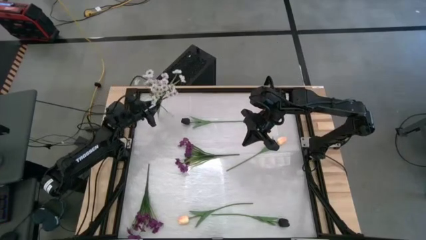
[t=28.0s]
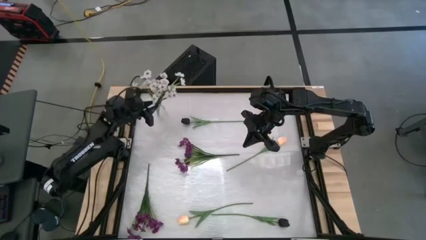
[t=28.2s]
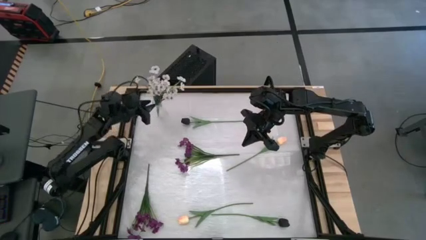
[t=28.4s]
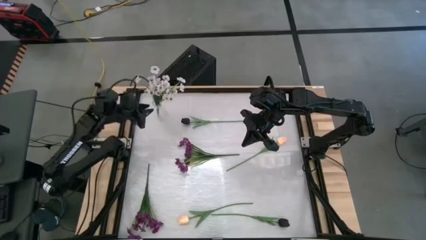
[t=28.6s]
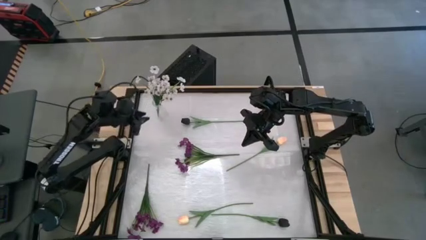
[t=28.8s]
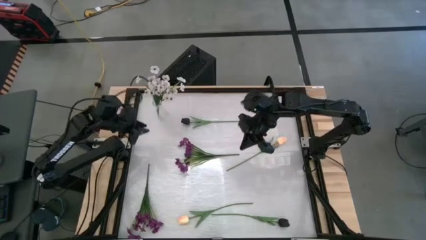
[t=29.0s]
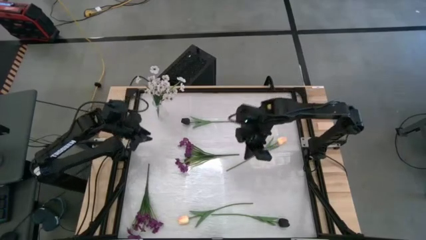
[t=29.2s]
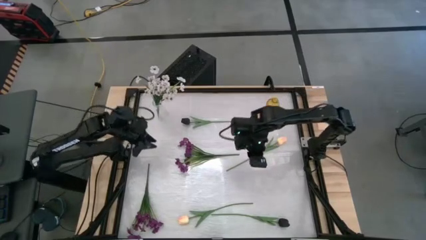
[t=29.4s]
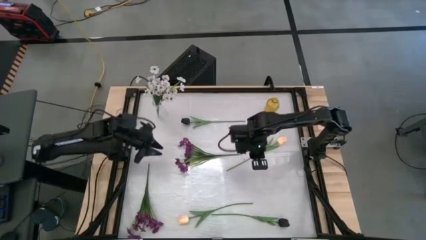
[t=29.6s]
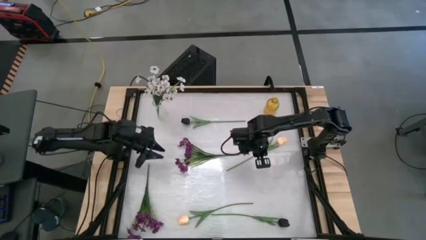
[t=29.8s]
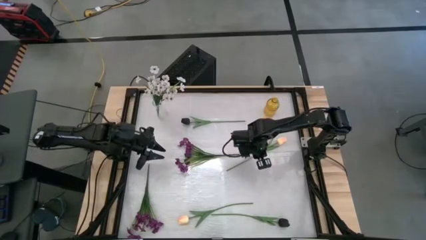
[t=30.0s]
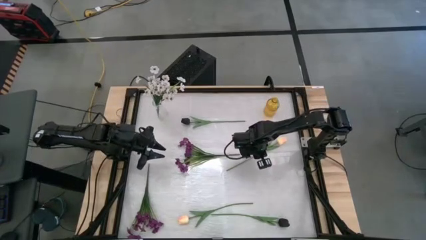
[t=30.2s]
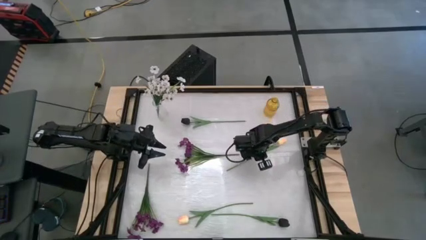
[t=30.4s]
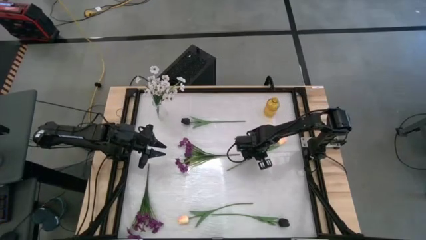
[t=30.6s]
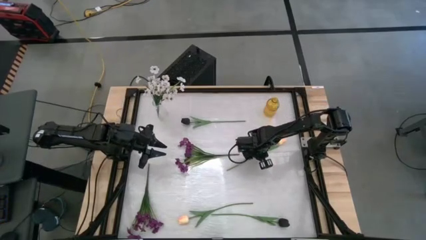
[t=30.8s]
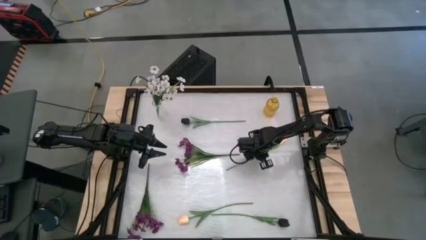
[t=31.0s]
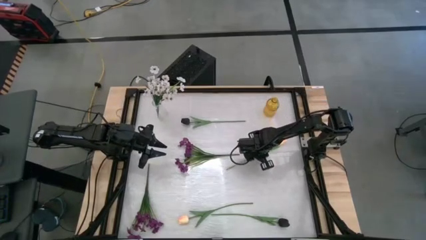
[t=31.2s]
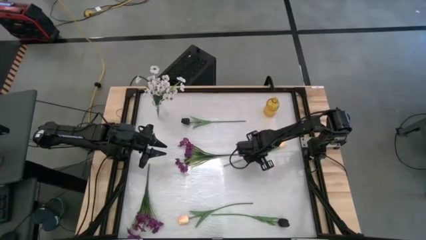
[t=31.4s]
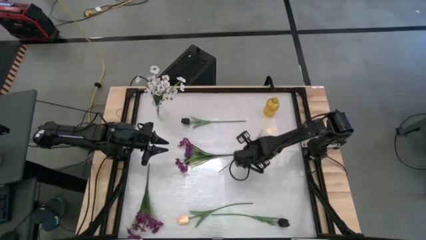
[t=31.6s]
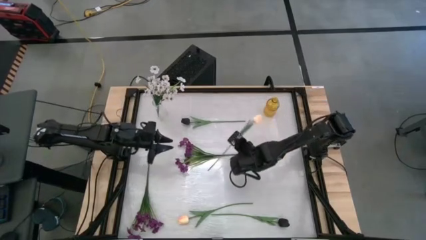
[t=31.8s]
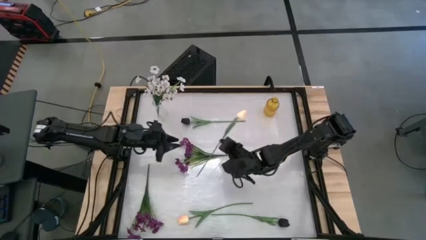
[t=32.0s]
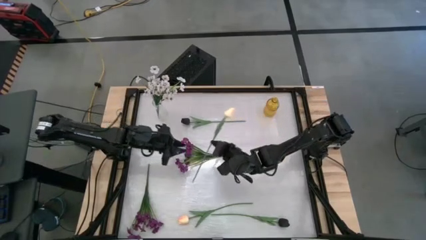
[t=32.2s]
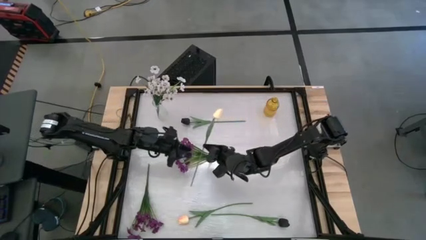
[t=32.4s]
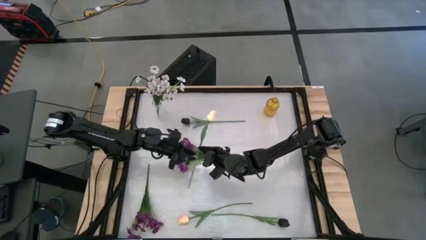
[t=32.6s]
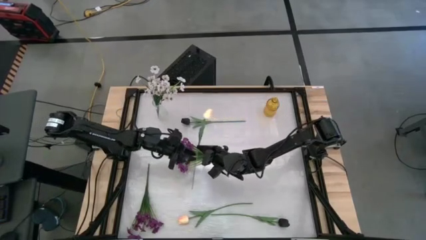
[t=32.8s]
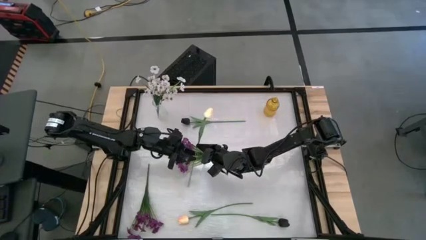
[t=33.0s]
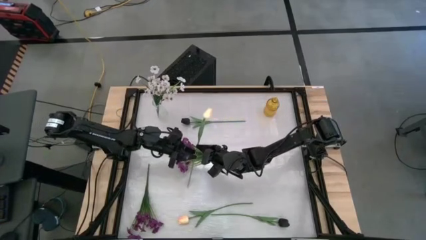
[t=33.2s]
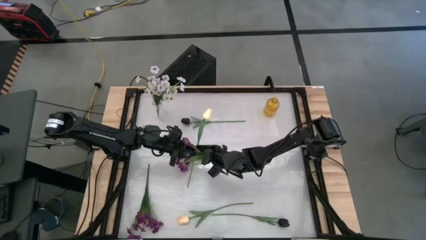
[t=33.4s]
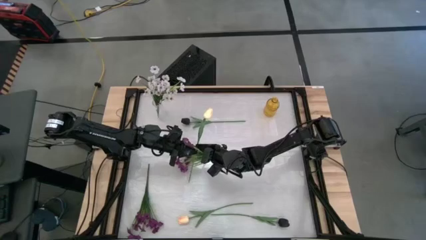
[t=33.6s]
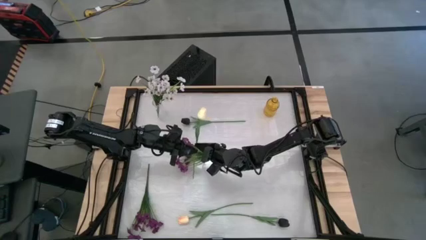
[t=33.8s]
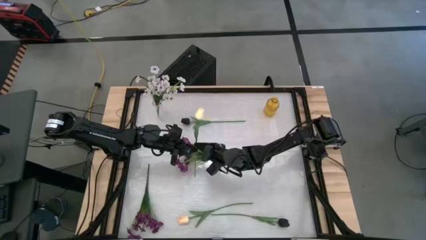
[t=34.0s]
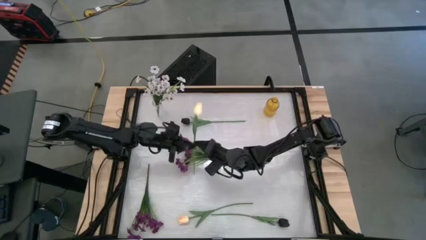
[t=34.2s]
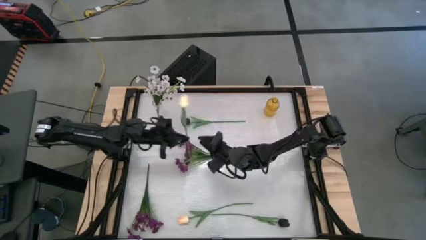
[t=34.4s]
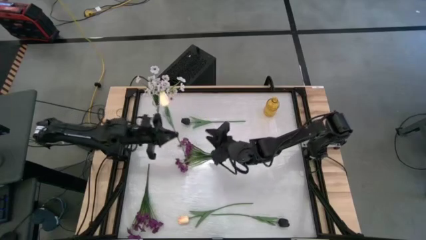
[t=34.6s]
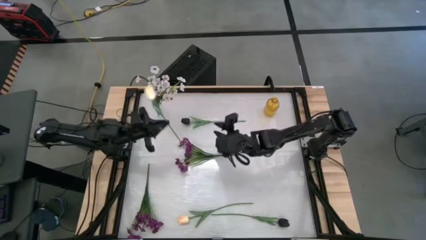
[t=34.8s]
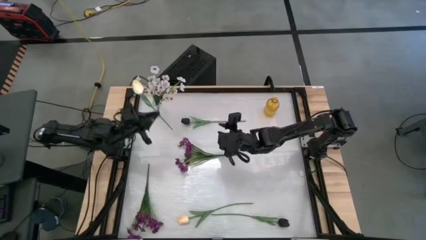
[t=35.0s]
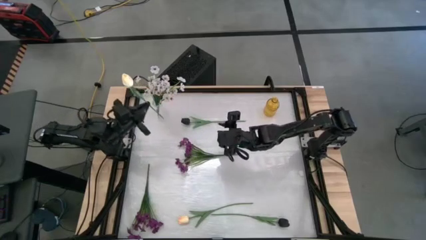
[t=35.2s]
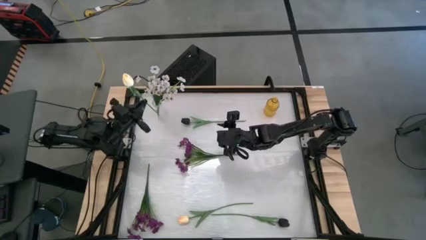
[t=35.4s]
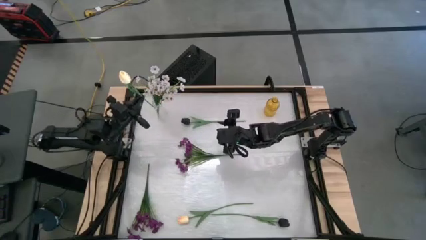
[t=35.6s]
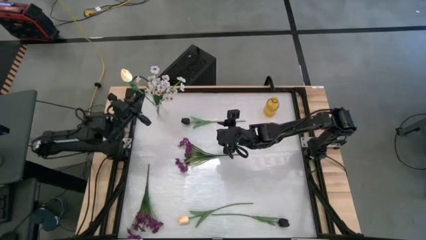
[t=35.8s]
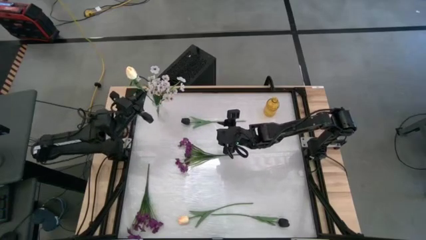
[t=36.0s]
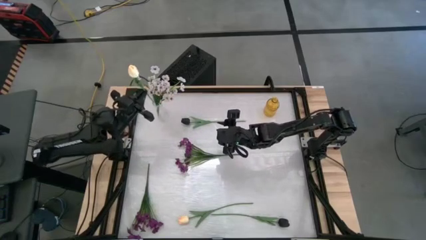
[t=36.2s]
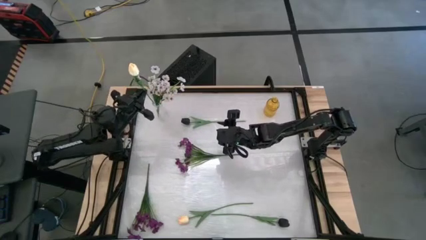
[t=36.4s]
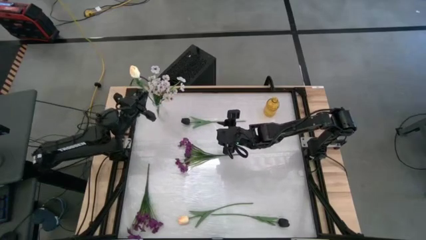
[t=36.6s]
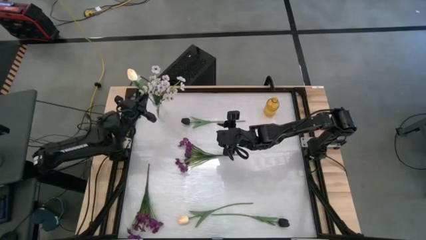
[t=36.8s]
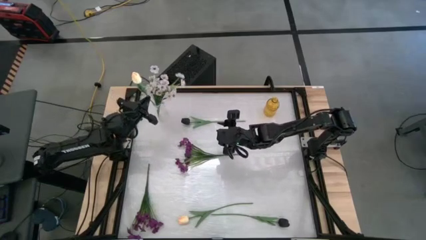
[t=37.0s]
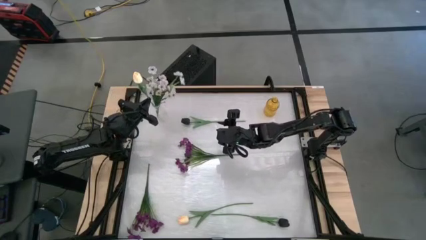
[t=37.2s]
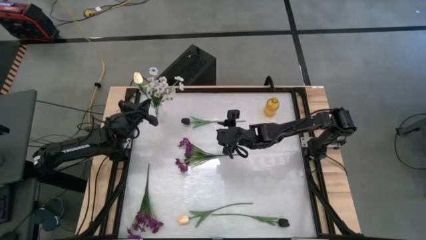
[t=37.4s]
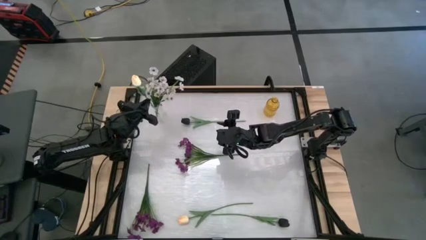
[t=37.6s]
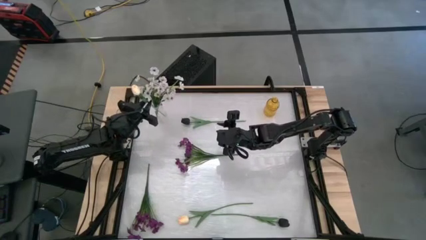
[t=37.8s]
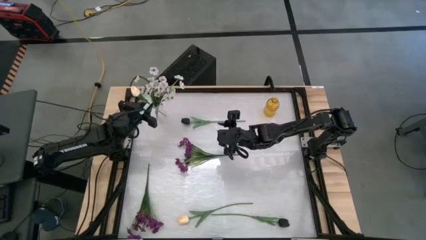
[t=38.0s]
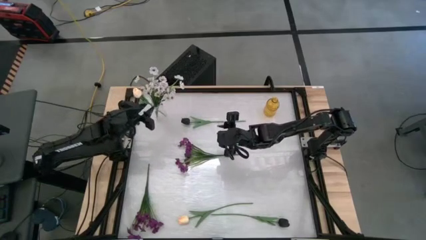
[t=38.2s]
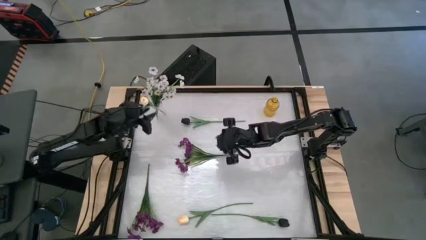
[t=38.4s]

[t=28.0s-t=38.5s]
Task: Sort flowers into vase by color
Put the top white flower into the transparent vase
